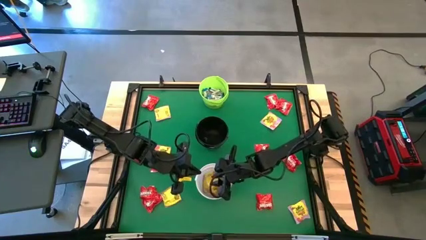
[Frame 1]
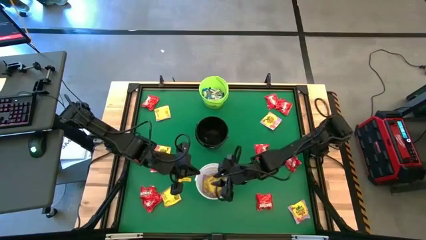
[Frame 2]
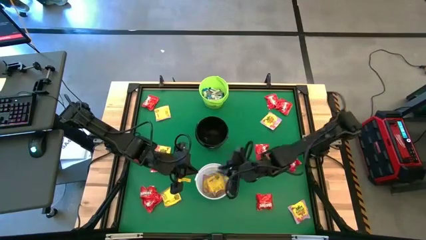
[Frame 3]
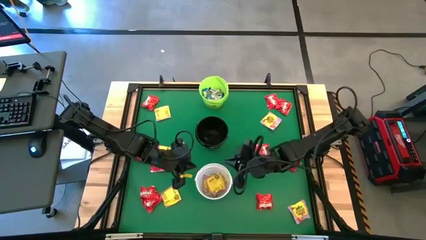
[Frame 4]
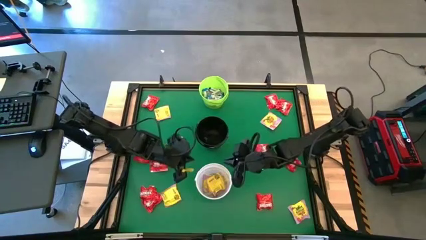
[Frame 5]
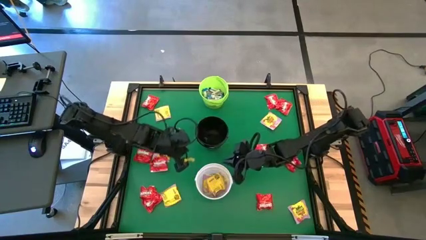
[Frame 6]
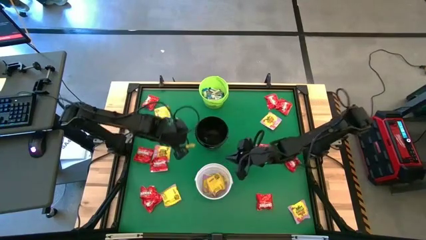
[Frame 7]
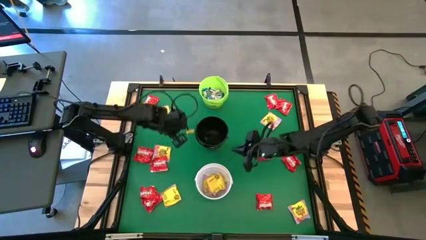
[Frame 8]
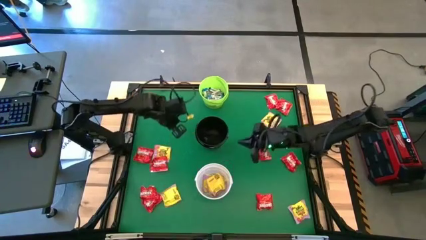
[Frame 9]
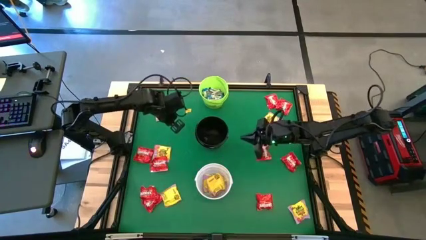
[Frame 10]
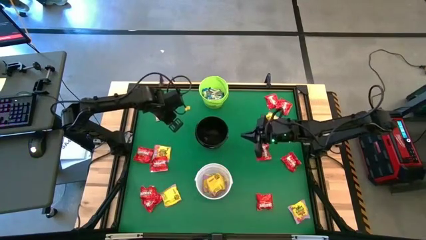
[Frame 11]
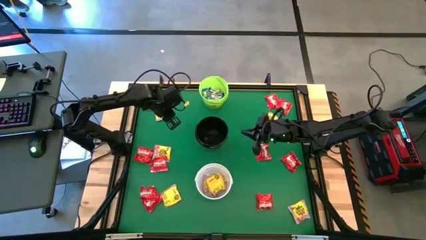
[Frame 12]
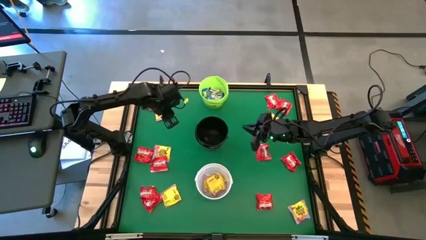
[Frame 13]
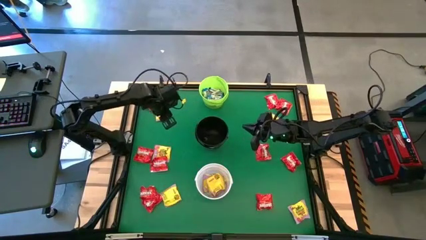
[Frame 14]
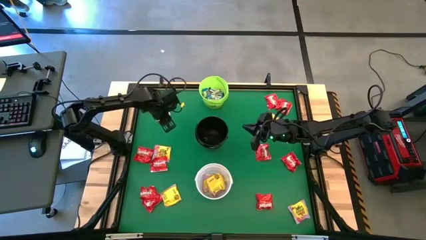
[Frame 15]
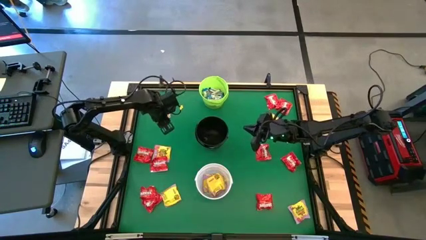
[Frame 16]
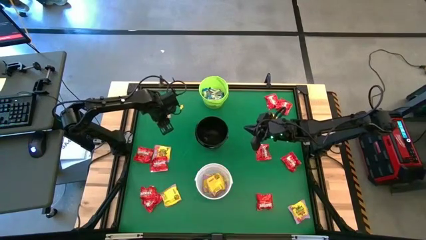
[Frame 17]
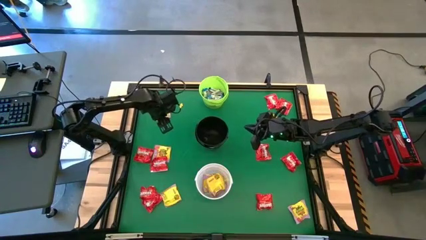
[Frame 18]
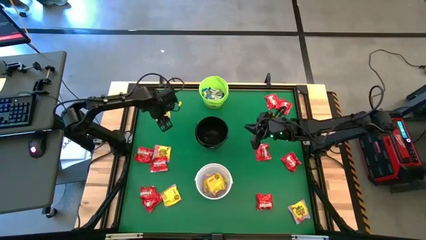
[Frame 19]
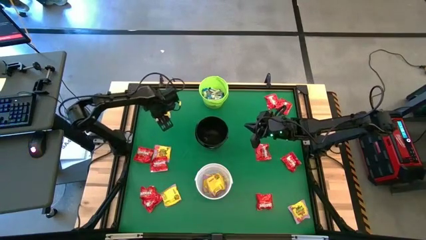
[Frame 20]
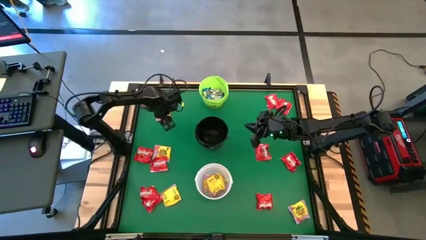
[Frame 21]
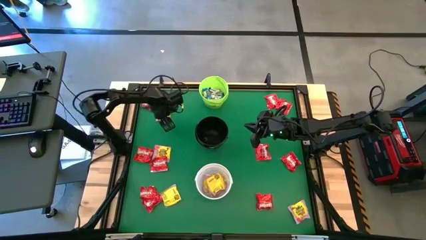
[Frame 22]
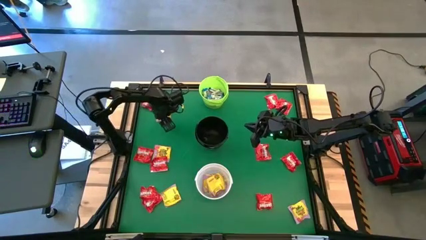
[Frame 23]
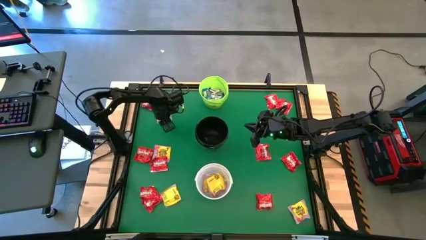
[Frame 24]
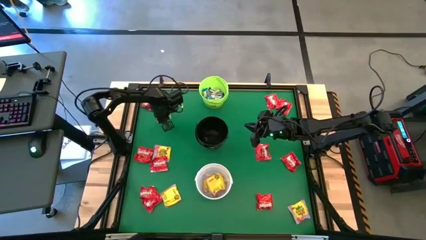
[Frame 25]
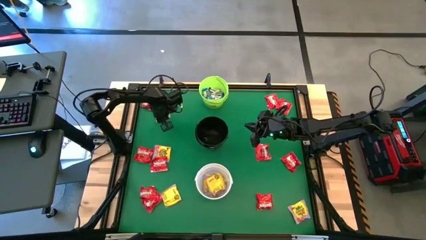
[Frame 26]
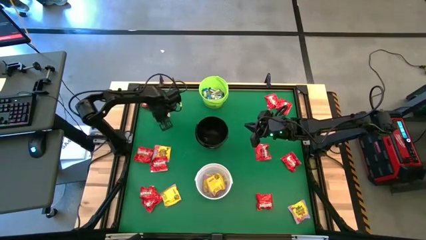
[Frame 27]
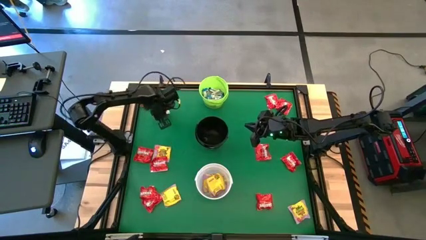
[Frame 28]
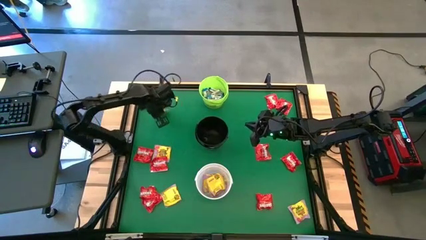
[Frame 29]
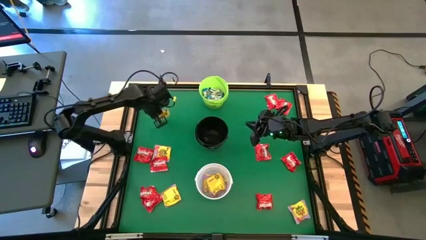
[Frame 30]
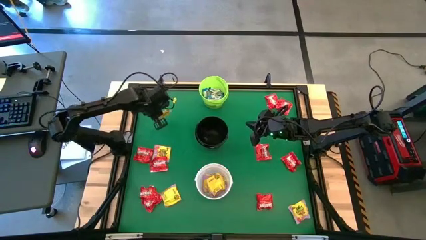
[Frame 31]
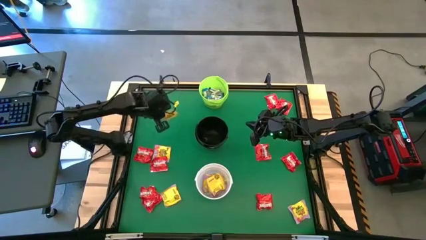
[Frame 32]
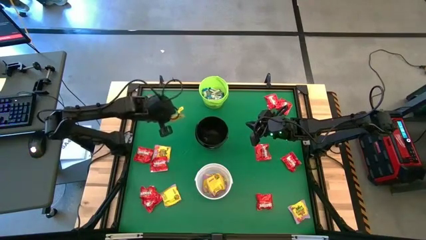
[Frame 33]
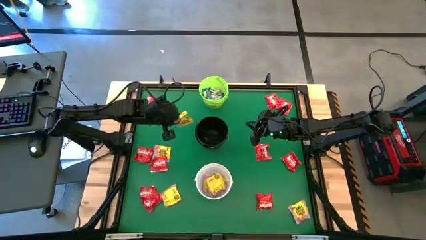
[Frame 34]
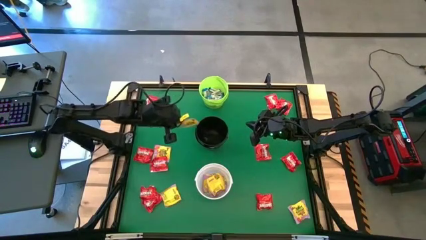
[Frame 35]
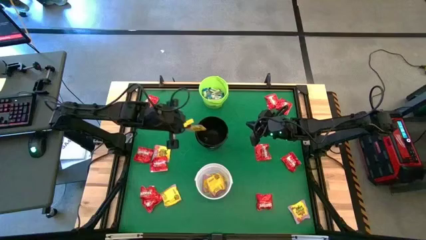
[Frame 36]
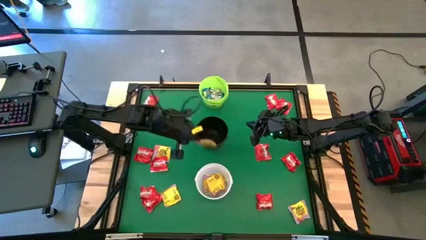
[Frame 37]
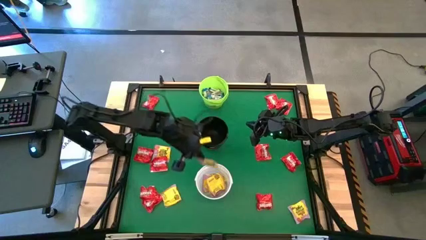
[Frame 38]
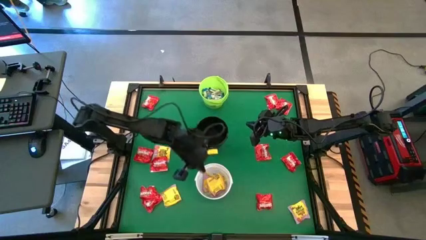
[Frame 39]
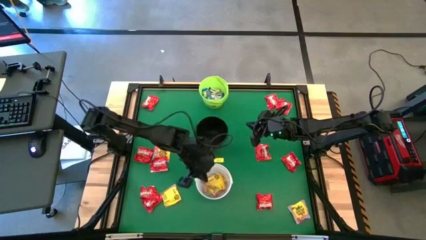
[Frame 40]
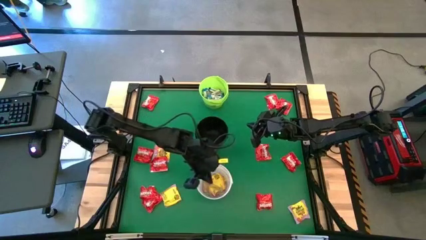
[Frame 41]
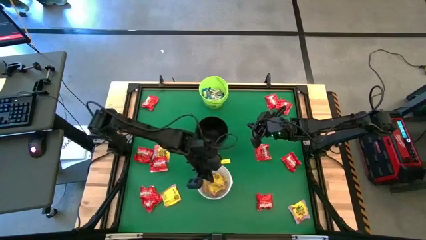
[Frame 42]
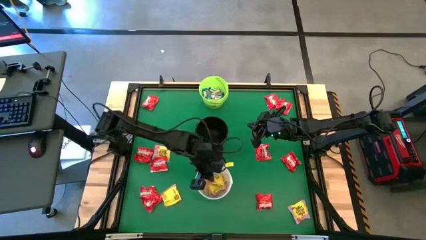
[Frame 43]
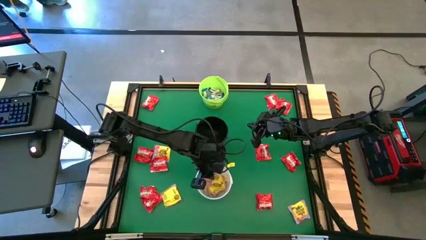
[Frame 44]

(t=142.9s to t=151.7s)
Task: Sort candy by brand, put in halloween buckets
Put the yellow chocolate into the white bucket

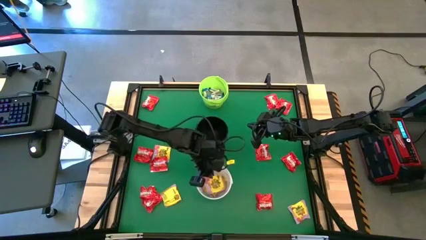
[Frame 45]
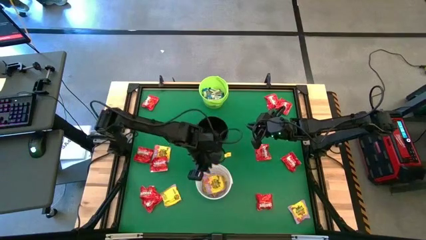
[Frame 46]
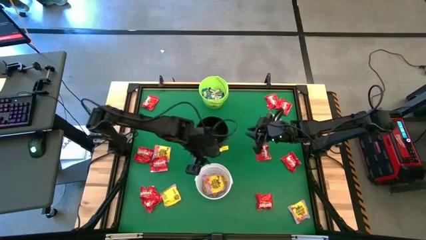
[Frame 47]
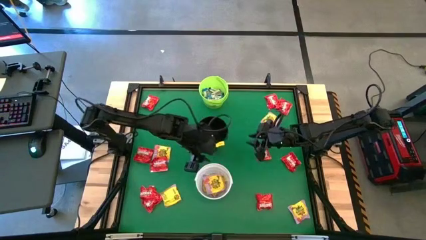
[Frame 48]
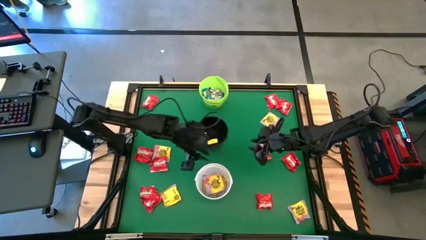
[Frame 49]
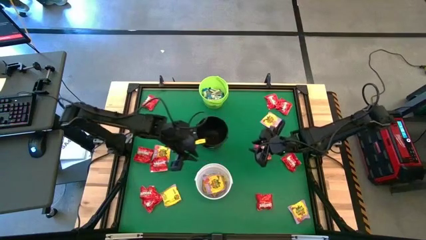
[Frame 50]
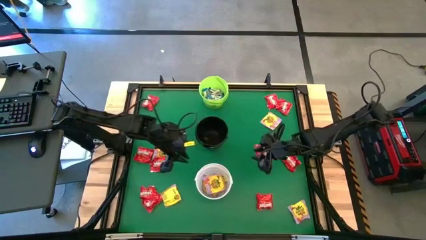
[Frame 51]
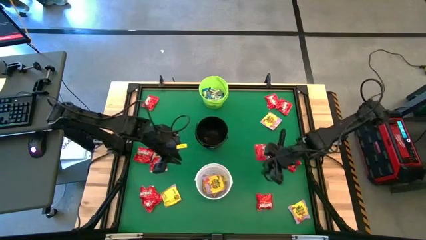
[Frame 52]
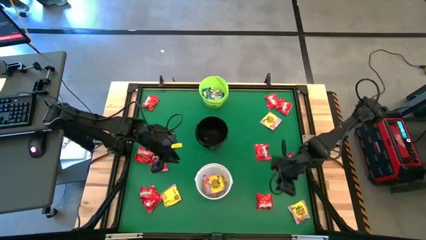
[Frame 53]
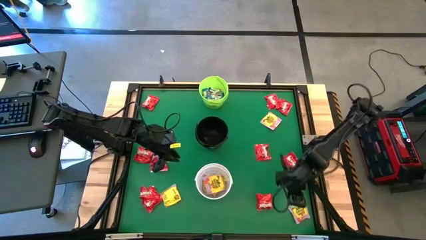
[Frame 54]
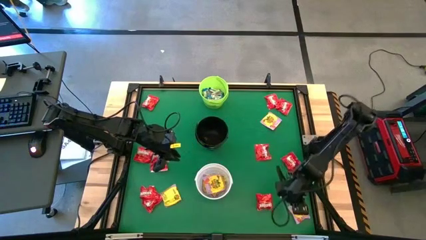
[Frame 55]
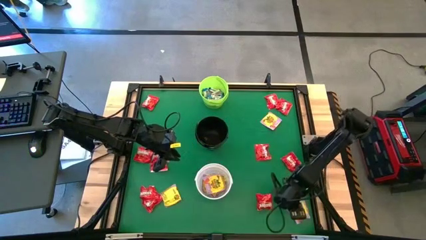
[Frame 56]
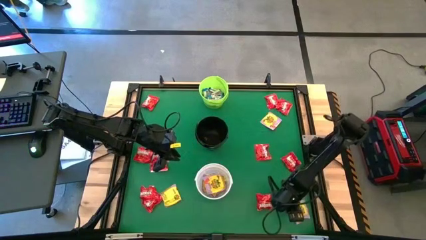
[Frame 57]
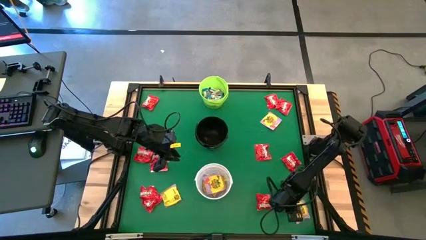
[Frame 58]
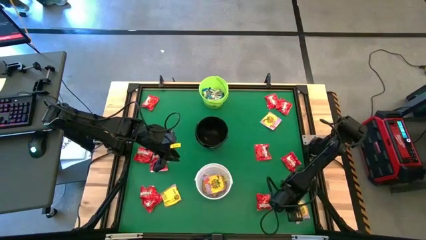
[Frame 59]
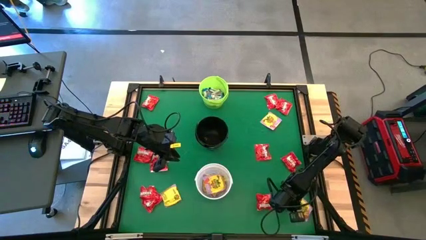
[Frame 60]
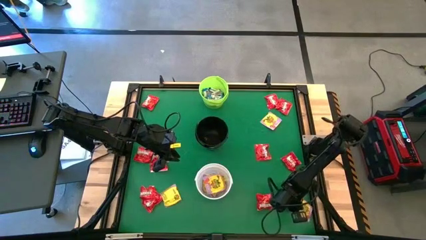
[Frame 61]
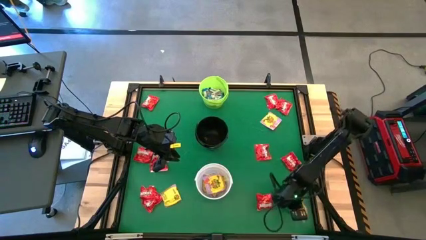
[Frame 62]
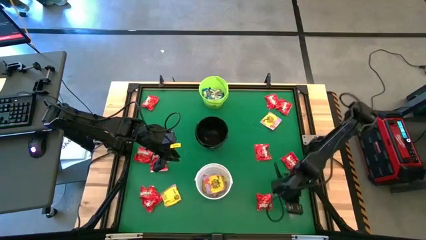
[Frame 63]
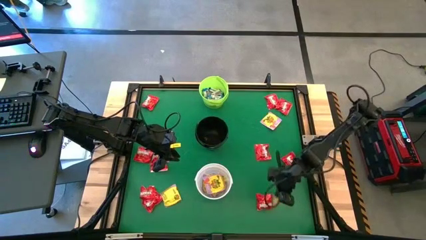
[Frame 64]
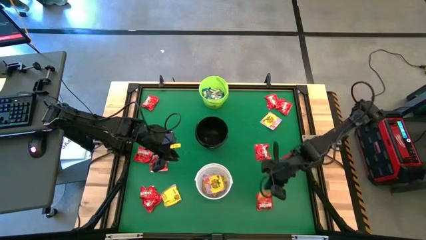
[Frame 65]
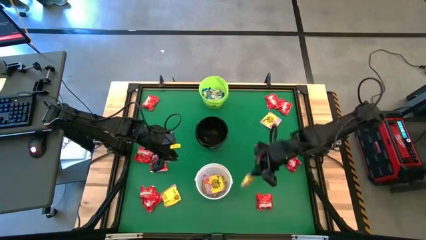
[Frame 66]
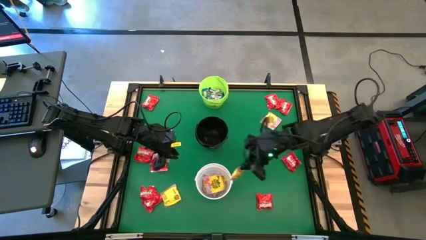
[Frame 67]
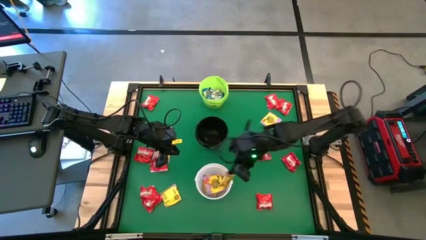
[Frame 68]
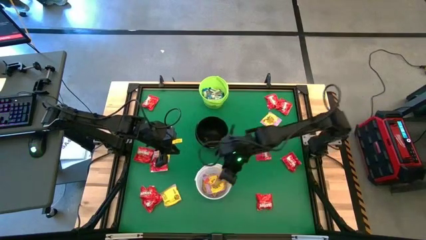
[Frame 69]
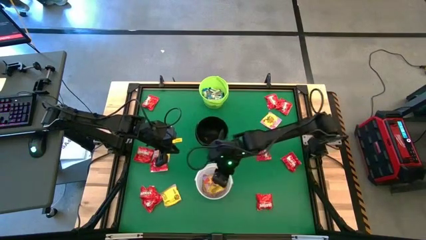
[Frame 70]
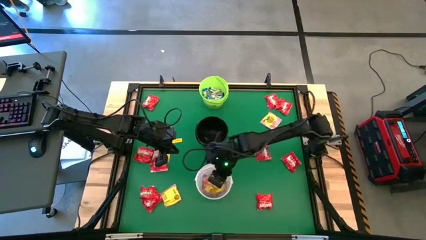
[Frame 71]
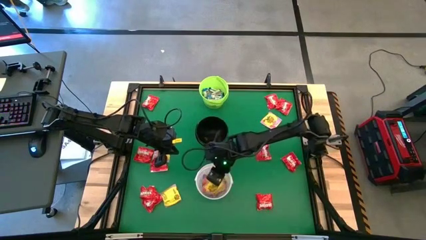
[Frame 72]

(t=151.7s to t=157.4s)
Put the yellow chocolate into the white bucket

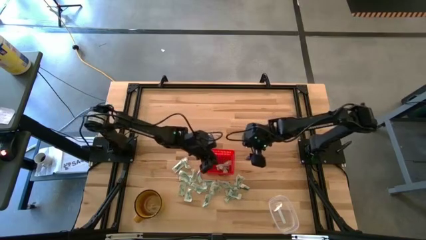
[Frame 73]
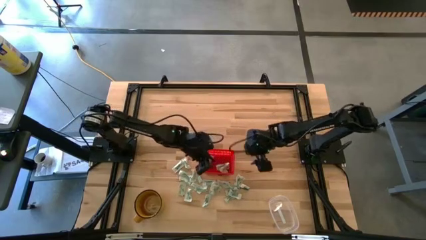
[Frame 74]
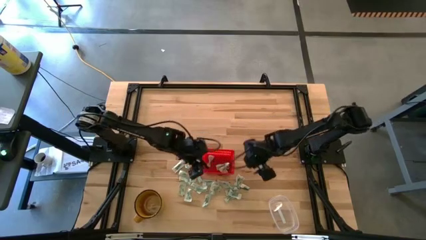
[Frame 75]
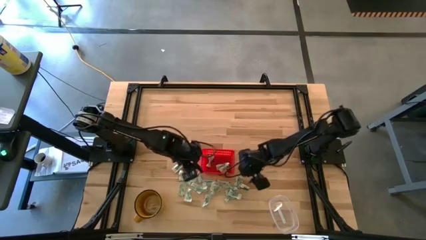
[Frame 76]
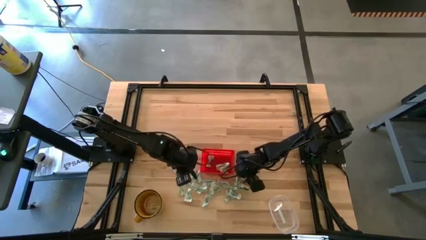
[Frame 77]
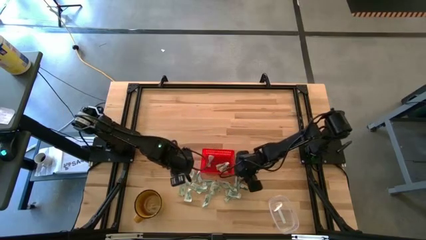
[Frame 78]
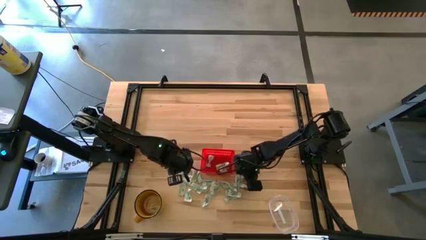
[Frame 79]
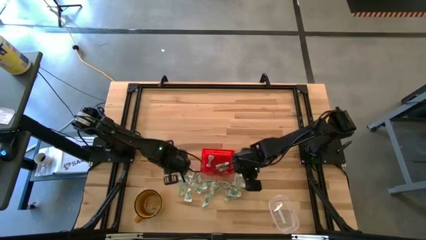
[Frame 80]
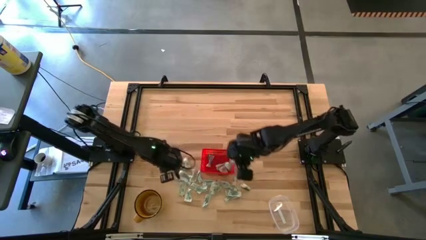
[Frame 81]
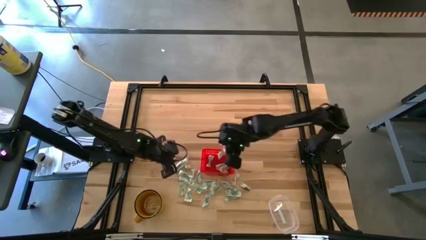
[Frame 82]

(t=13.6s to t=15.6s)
Task: Pick and place Stevia / Truvia into bins
Put the stevia packet into the orange basket

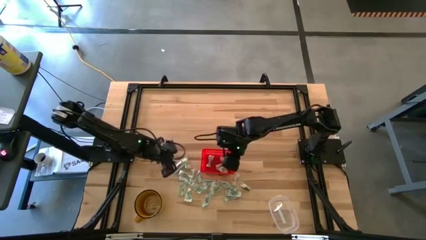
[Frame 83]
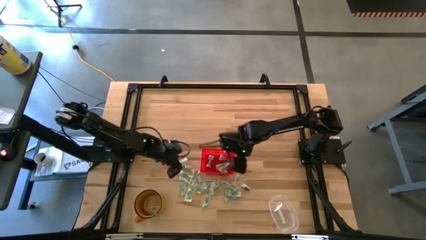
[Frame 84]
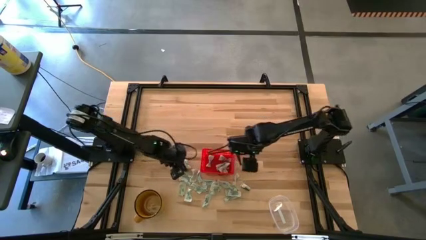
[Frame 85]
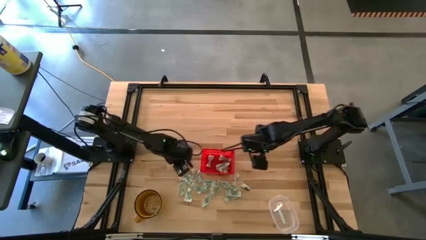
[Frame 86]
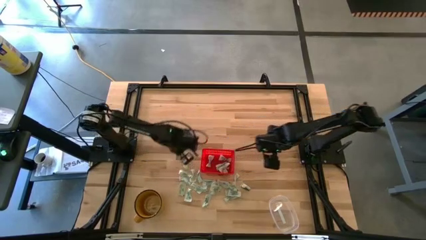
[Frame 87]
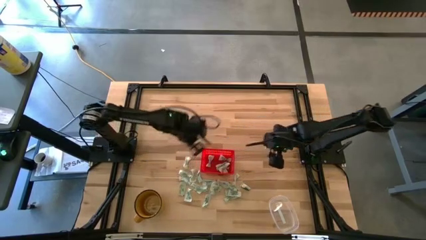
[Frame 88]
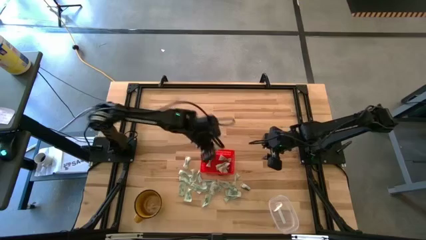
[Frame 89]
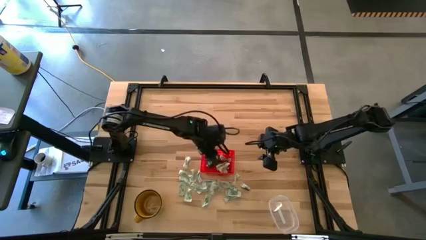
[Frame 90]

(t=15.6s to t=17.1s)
Put the stevia packet into the orange basket
